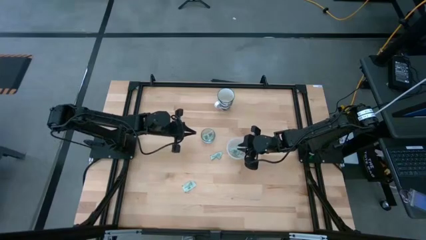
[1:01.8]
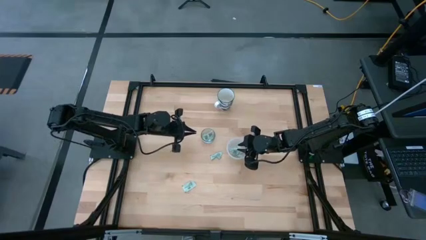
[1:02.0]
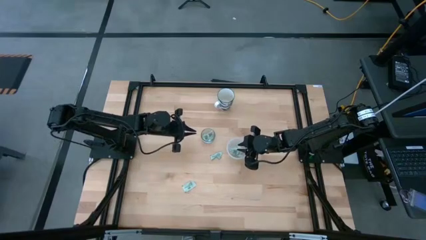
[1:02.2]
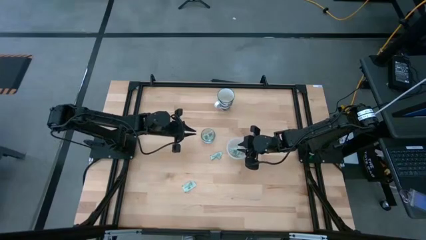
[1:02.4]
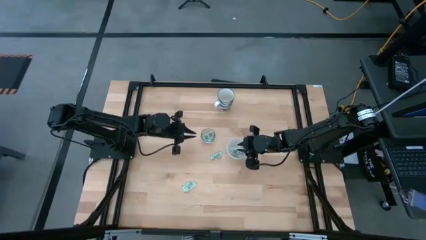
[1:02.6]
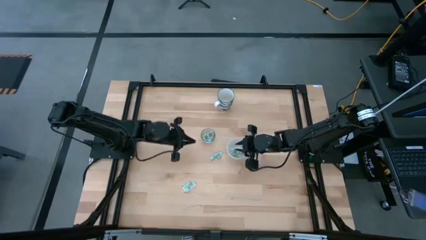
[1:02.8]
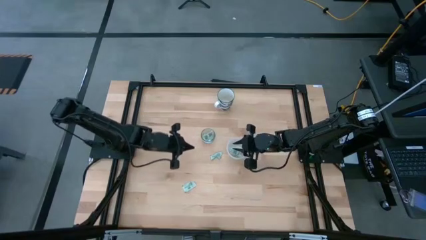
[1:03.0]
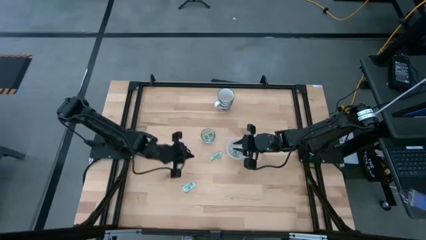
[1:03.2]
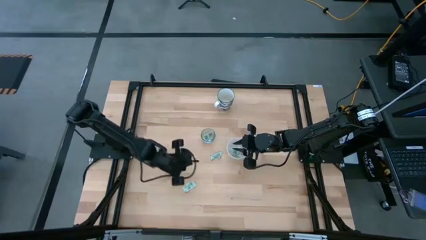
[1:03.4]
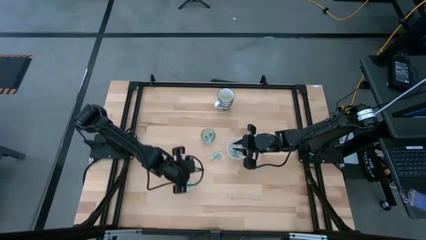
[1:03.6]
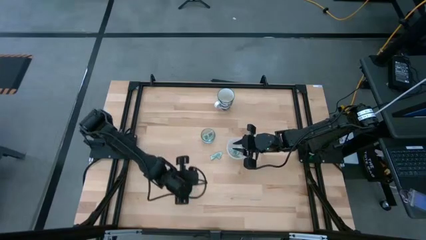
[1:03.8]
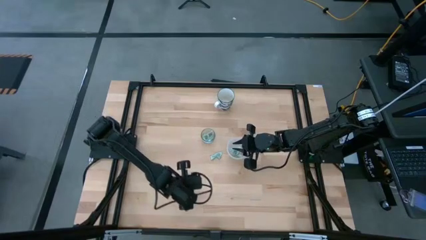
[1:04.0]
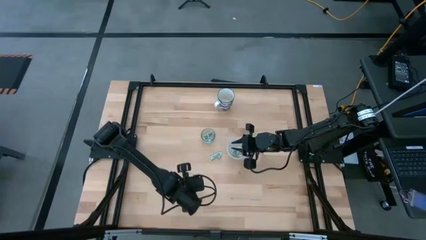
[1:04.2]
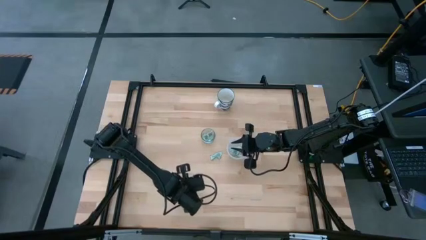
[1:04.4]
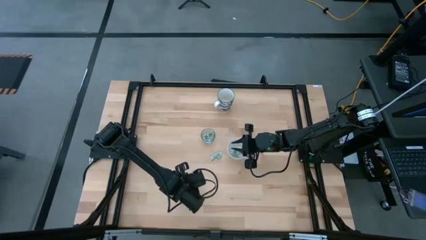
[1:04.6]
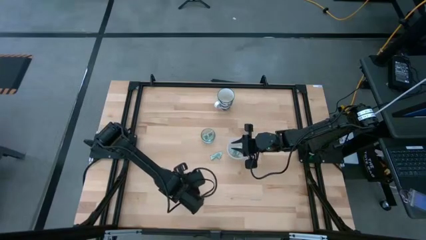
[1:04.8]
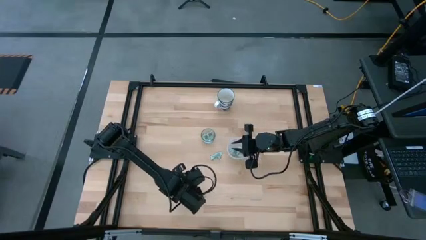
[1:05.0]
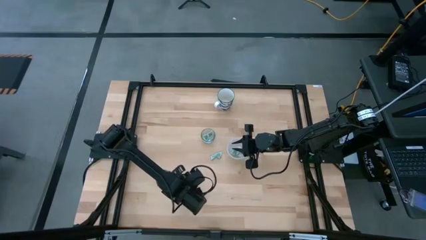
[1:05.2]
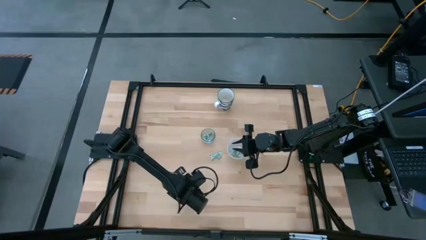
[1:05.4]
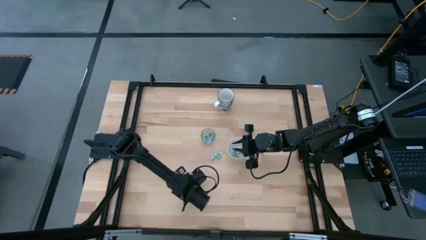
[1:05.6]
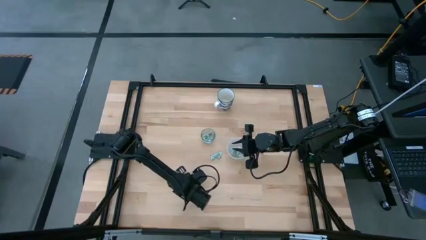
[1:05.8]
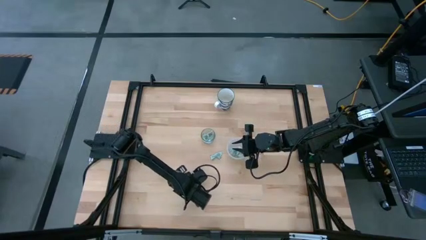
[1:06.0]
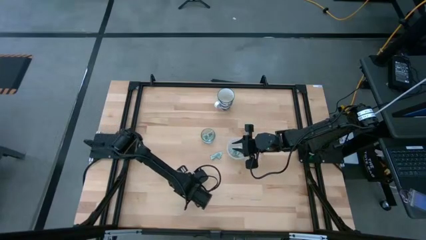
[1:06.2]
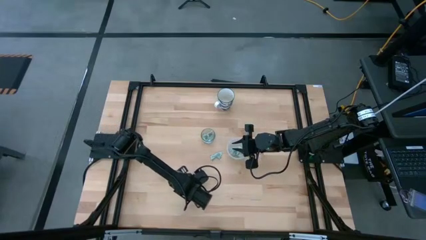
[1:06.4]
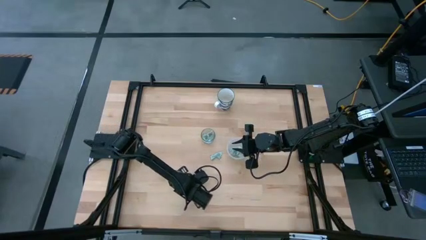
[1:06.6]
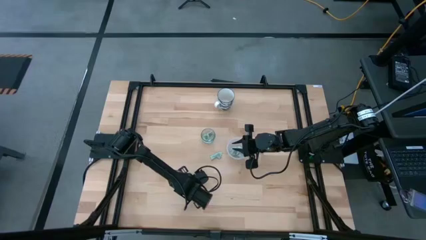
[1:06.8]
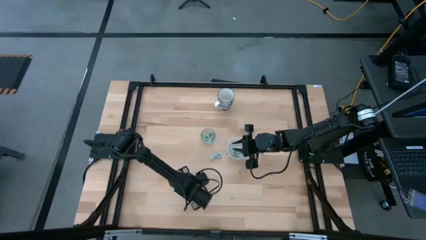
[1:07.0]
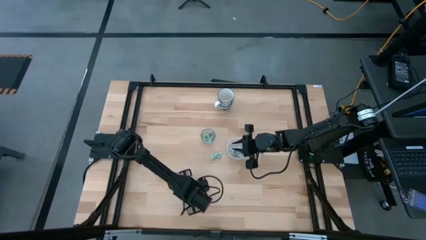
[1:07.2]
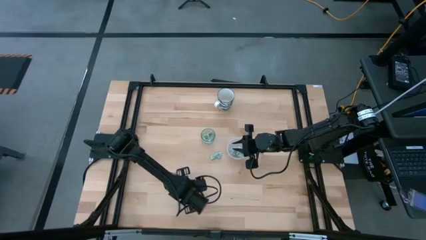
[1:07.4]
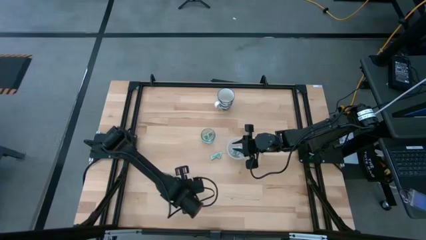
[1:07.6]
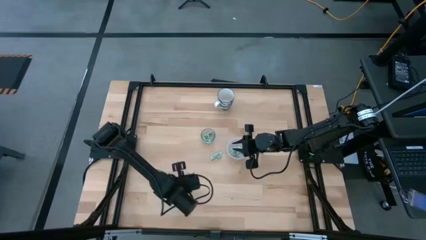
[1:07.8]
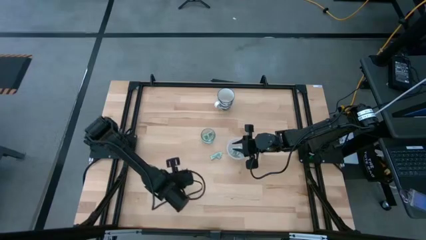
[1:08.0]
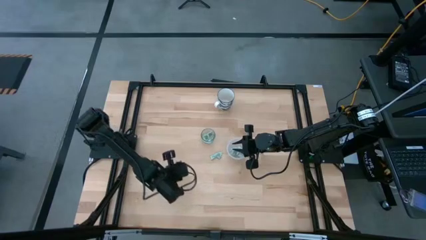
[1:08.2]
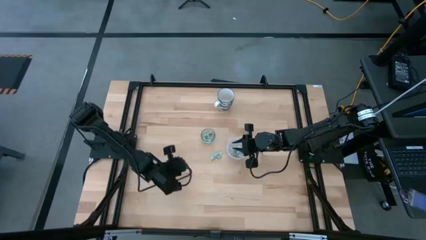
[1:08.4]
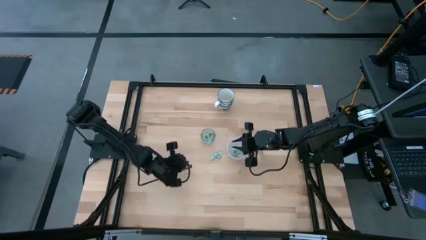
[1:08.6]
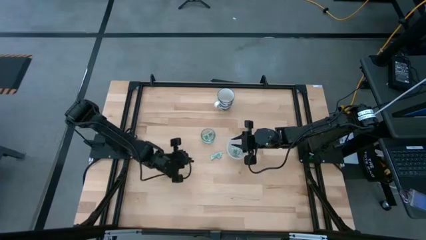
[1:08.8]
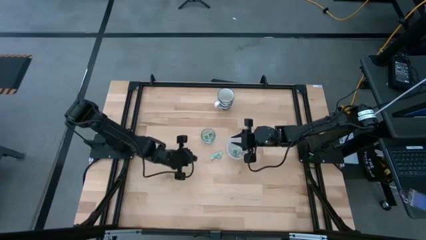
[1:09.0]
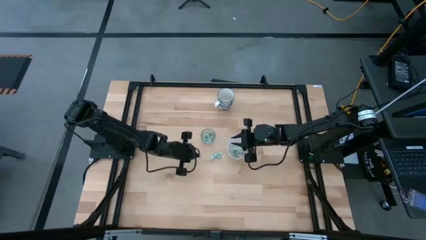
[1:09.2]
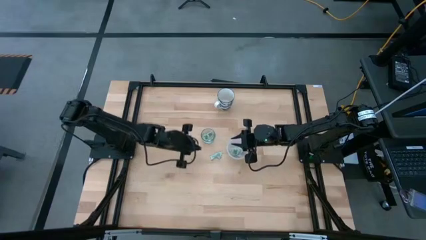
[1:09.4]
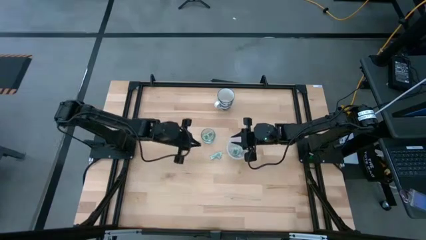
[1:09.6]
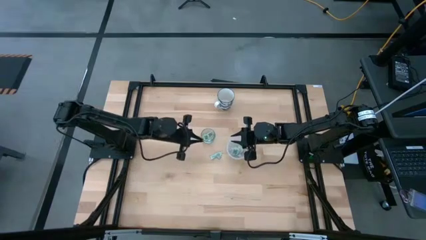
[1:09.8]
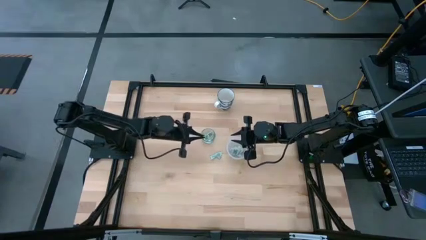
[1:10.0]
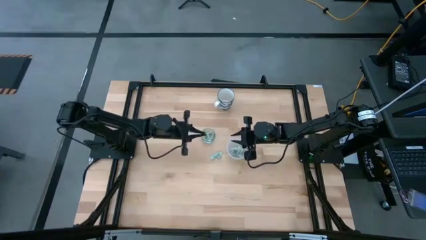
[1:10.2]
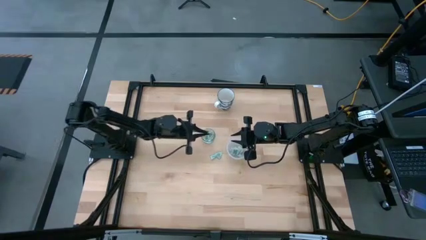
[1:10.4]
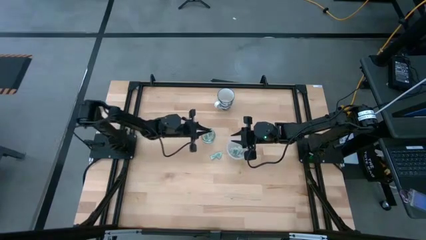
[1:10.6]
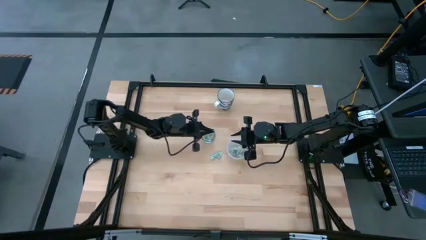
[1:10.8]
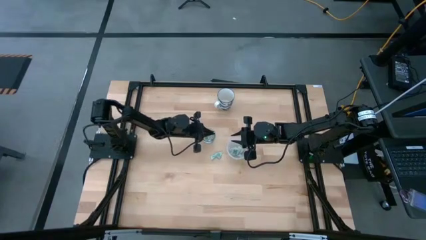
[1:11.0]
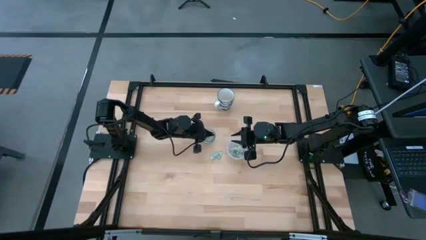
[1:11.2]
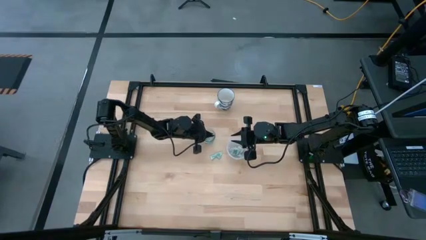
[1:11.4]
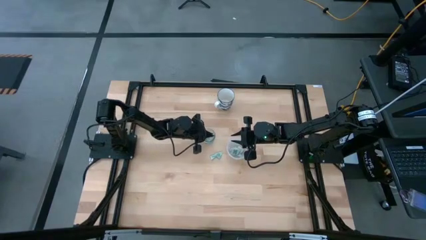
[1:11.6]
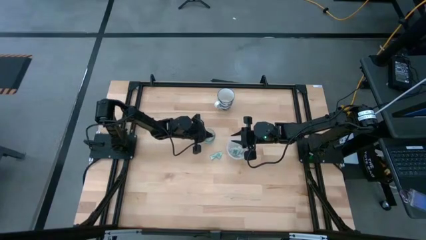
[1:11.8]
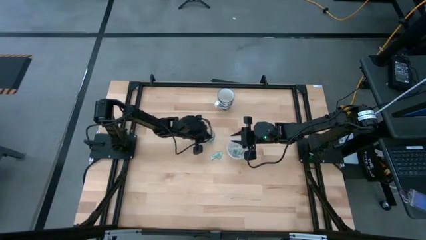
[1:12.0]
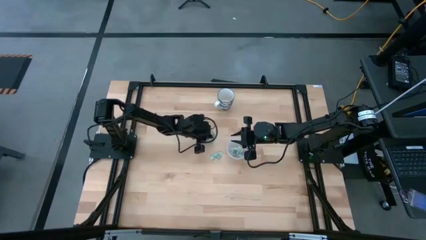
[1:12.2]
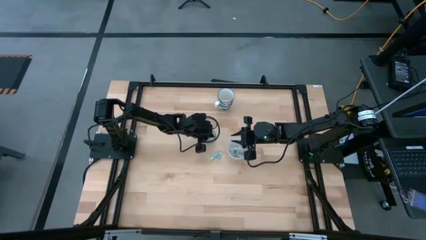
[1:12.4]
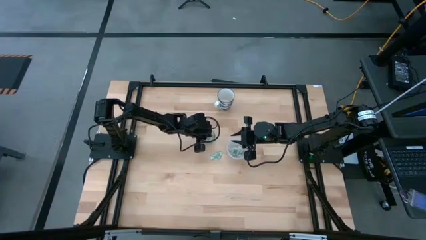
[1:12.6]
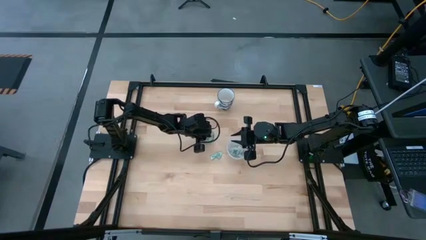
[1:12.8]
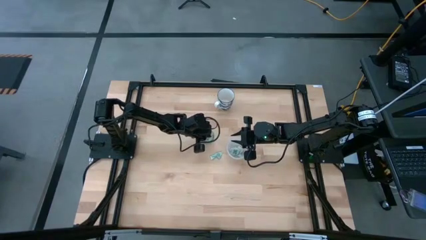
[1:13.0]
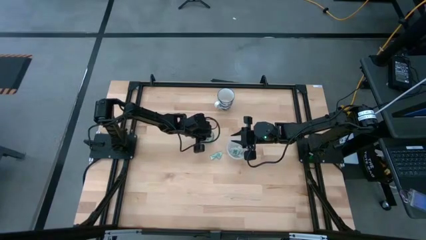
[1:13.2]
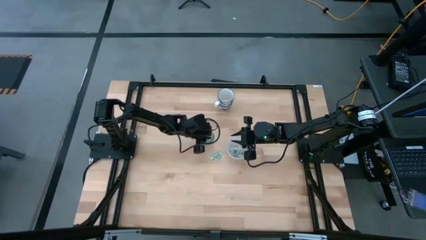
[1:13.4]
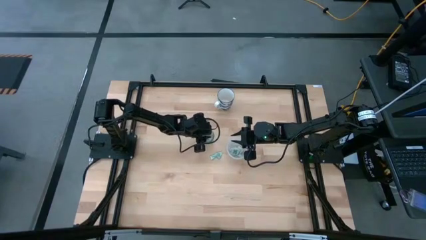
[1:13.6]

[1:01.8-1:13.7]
Task: Pick and place Stevia / Truvia into bins
Put the stevia packet into the glass container

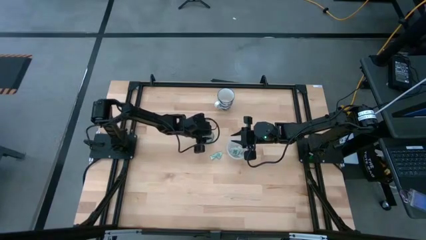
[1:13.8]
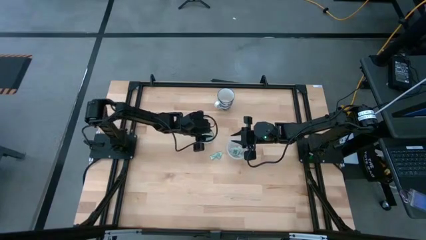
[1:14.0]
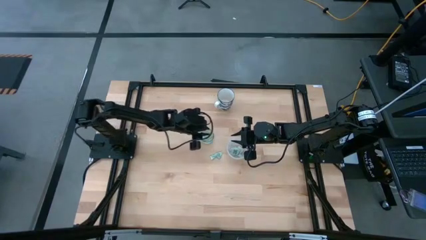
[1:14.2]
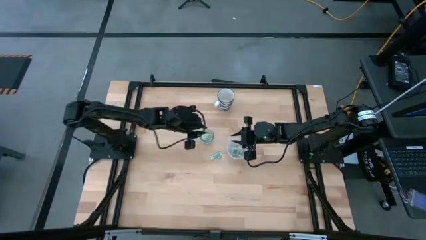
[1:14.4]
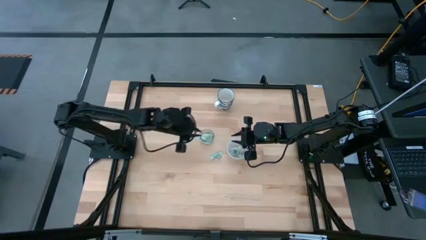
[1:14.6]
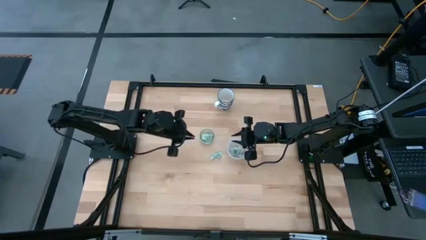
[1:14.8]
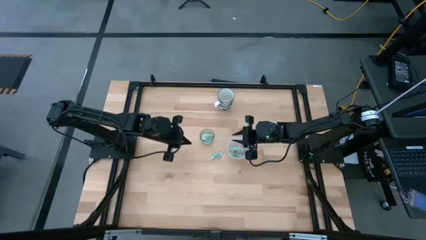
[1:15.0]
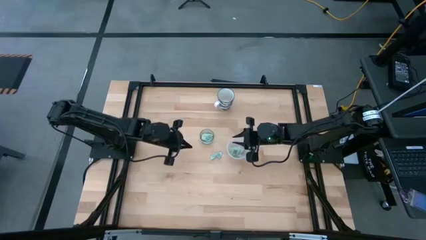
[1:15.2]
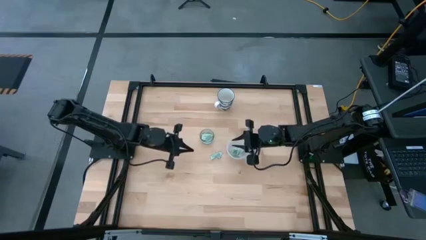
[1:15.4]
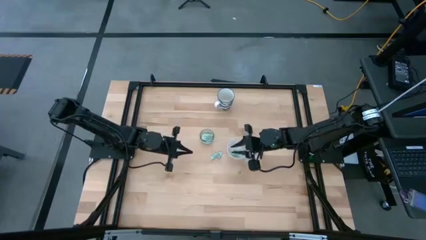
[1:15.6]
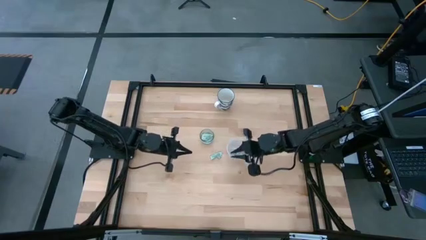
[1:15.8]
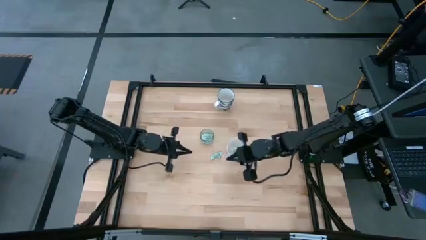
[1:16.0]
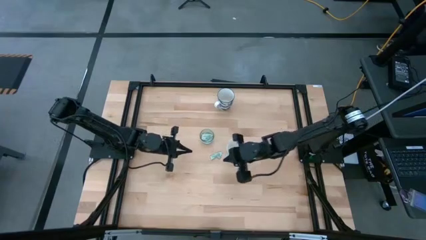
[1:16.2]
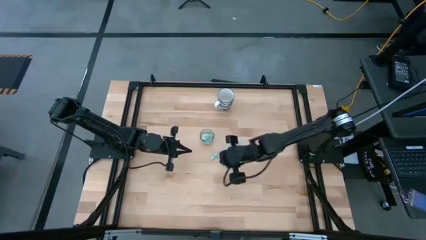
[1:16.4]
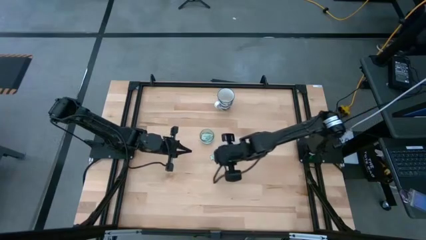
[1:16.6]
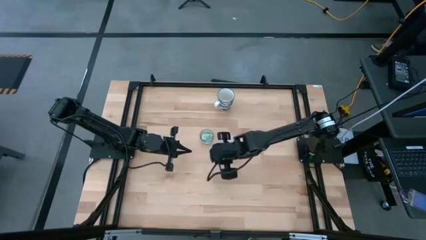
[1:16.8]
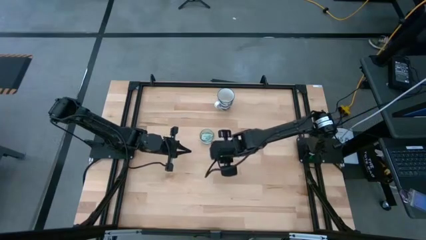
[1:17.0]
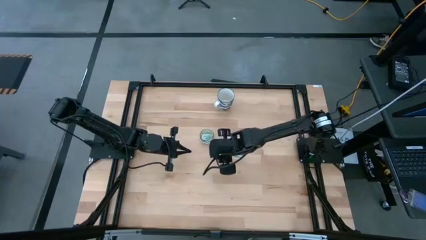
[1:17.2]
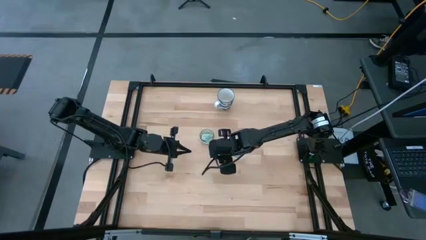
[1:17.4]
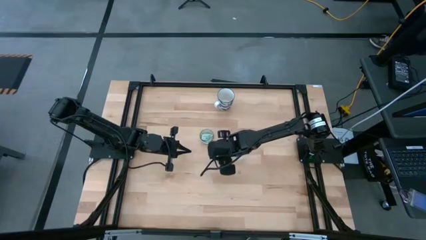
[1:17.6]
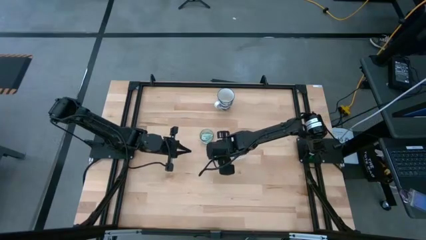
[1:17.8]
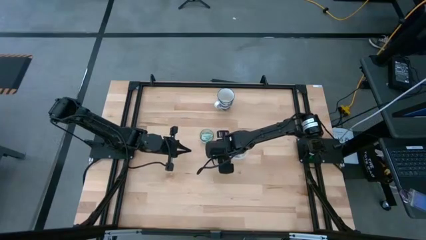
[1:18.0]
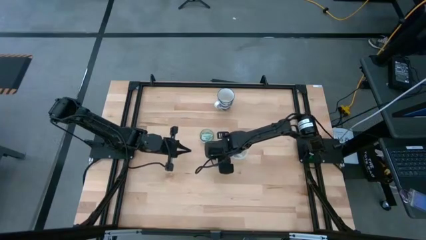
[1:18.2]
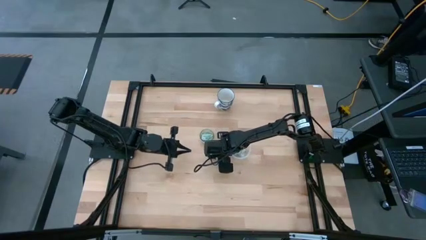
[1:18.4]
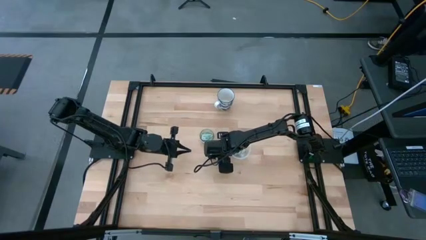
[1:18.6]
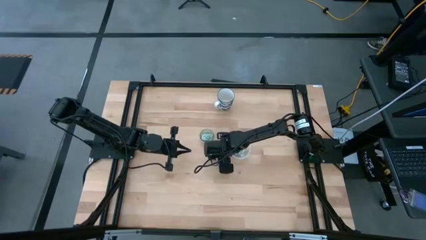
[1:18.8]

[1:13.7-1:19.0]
Put the stevia packet into the transparent container
